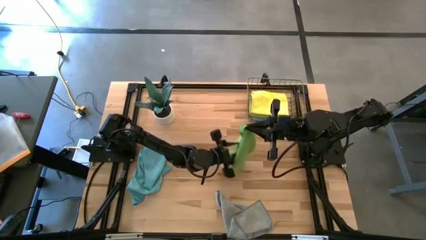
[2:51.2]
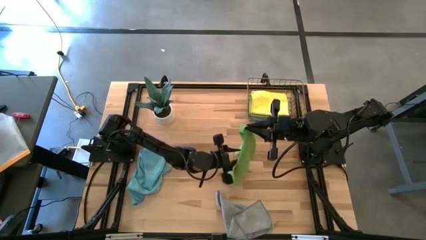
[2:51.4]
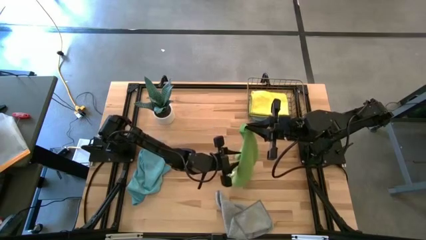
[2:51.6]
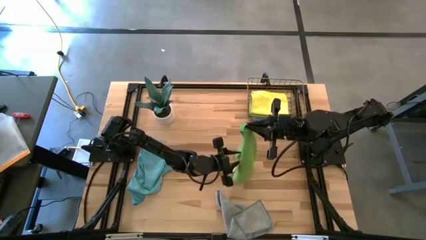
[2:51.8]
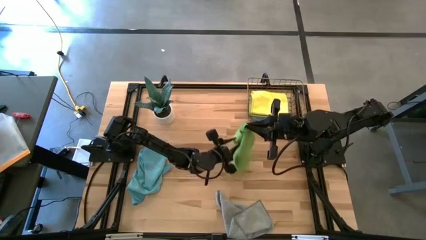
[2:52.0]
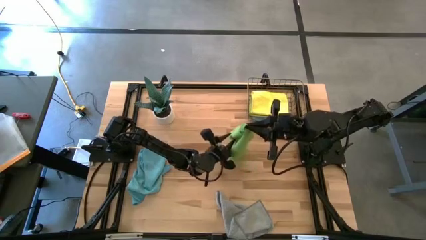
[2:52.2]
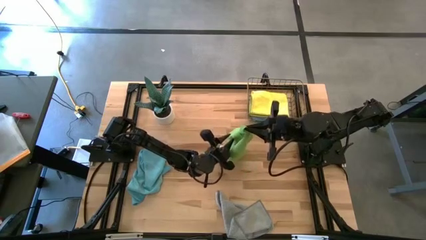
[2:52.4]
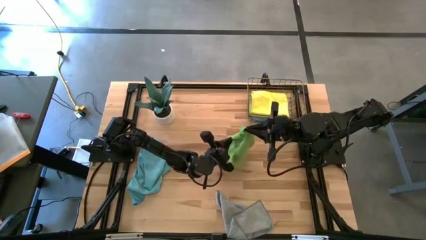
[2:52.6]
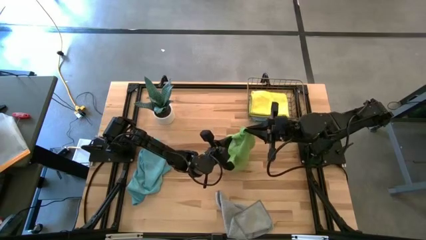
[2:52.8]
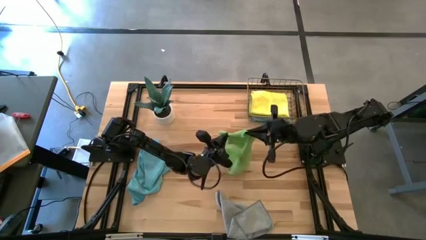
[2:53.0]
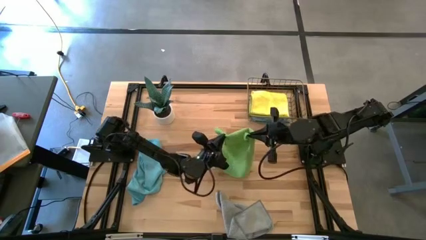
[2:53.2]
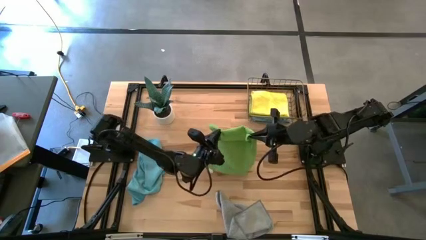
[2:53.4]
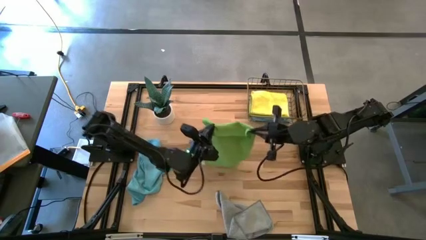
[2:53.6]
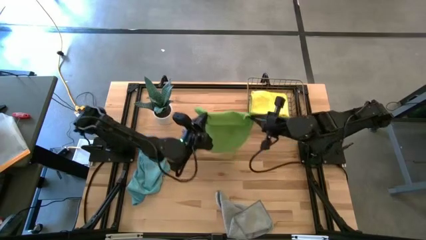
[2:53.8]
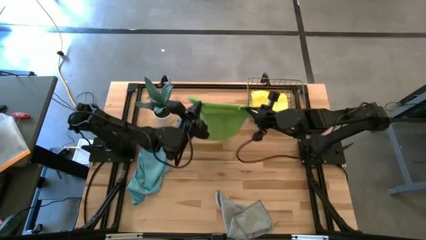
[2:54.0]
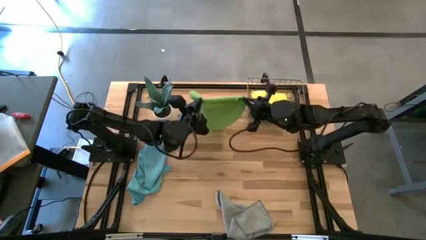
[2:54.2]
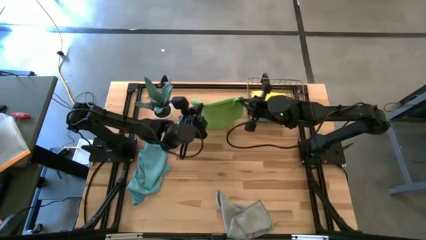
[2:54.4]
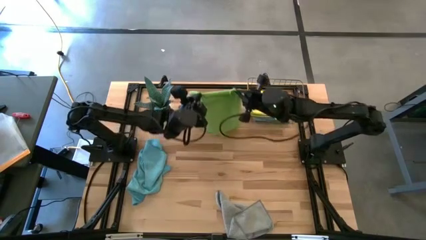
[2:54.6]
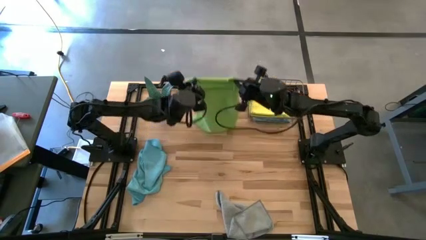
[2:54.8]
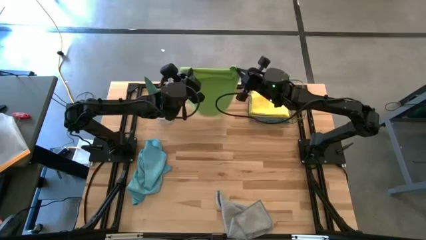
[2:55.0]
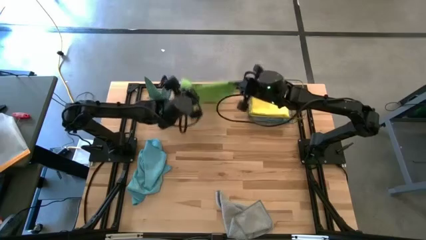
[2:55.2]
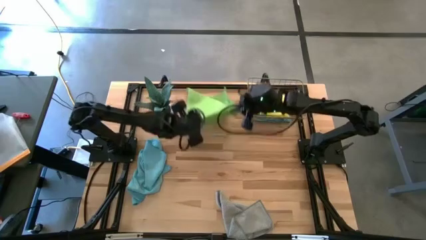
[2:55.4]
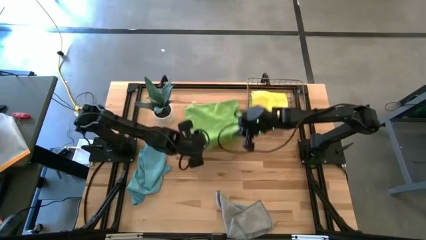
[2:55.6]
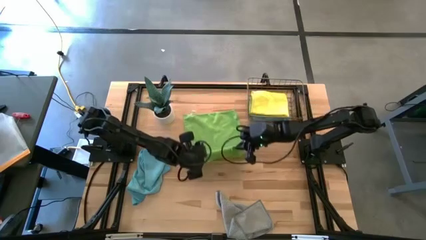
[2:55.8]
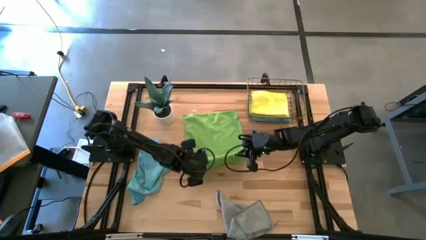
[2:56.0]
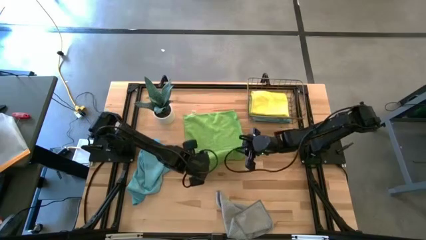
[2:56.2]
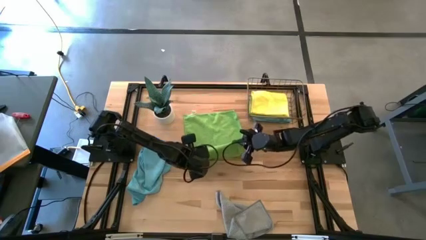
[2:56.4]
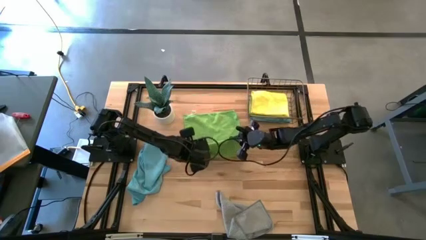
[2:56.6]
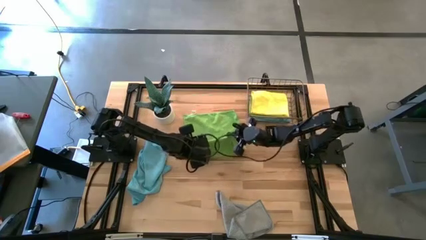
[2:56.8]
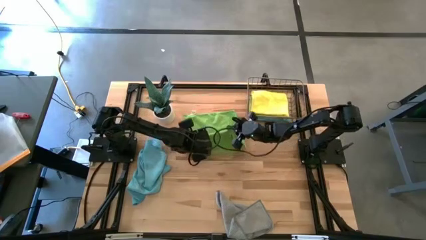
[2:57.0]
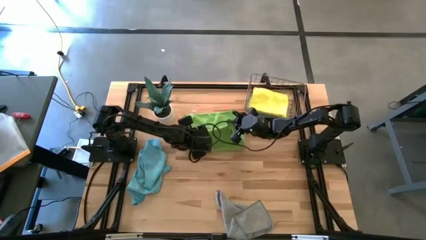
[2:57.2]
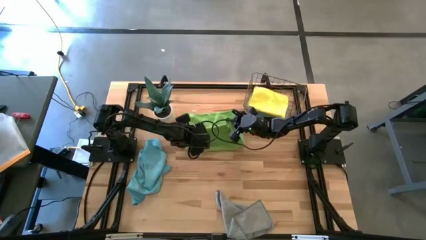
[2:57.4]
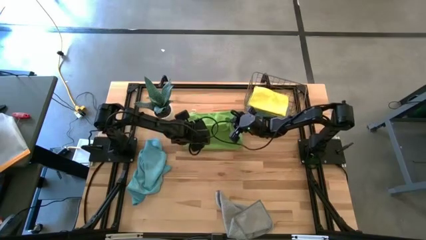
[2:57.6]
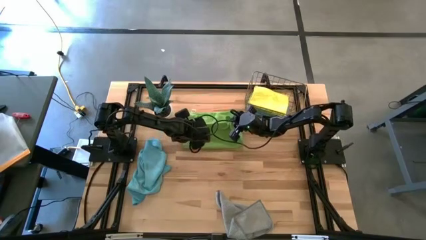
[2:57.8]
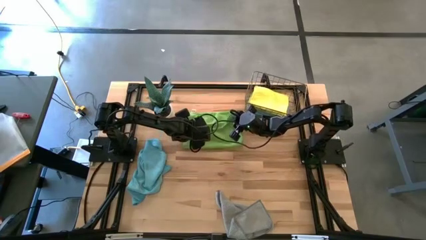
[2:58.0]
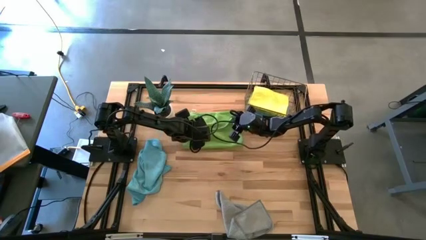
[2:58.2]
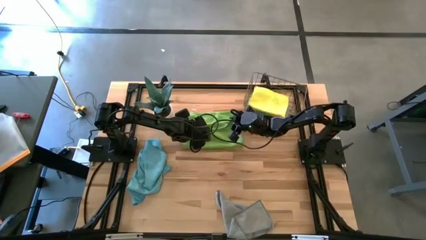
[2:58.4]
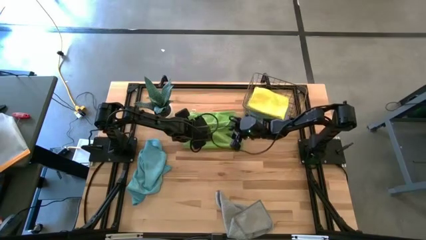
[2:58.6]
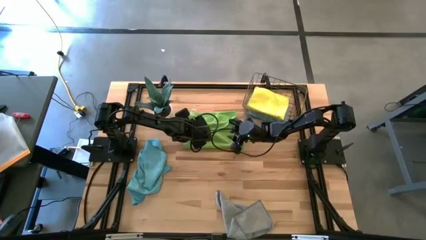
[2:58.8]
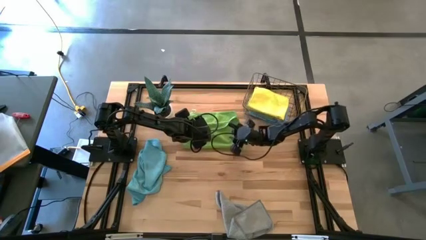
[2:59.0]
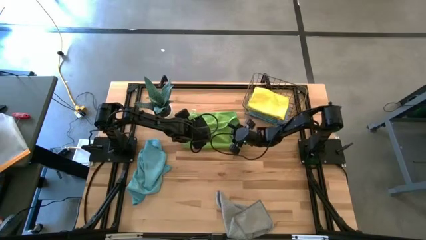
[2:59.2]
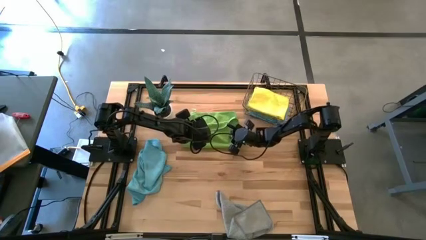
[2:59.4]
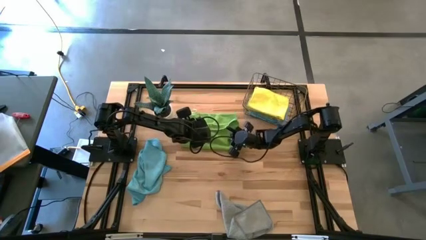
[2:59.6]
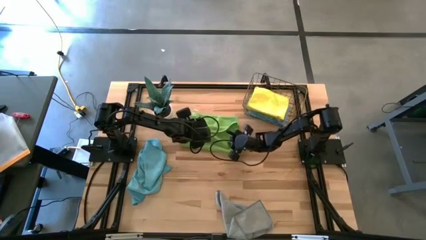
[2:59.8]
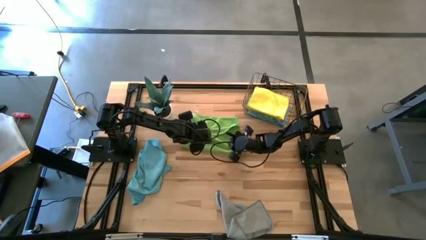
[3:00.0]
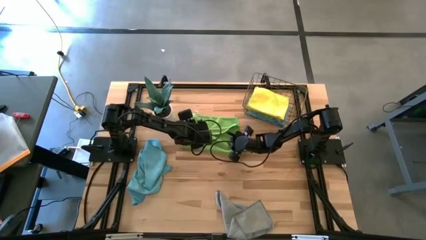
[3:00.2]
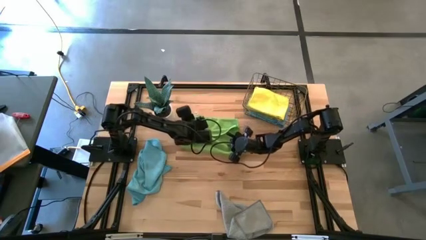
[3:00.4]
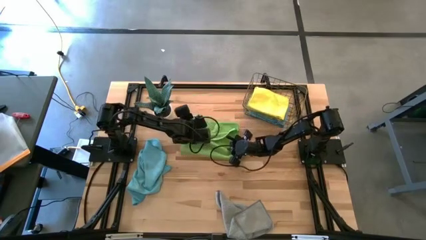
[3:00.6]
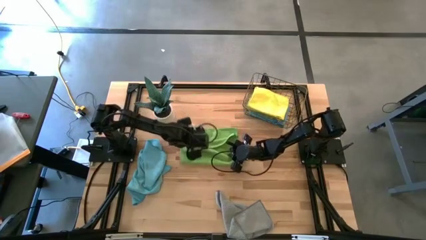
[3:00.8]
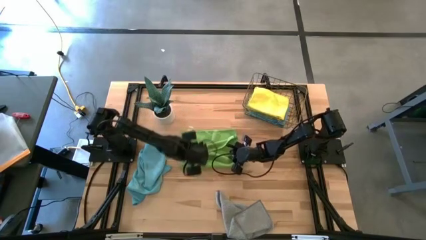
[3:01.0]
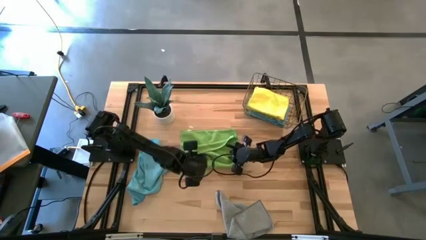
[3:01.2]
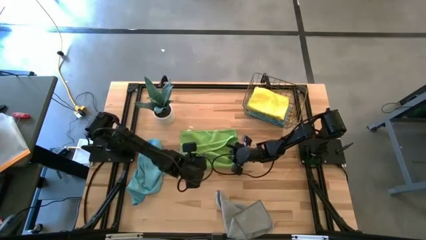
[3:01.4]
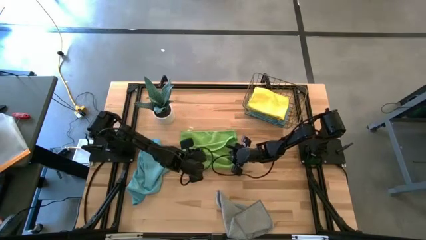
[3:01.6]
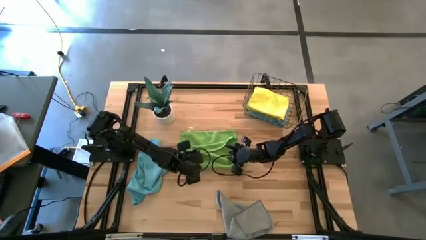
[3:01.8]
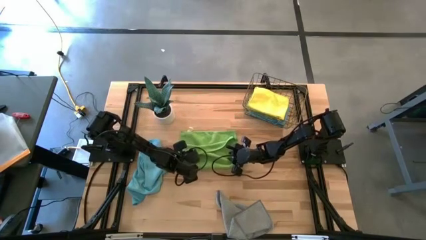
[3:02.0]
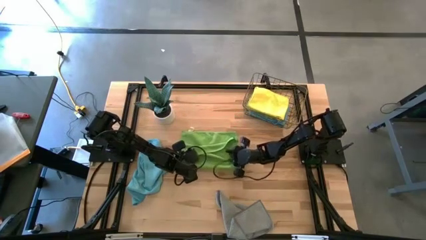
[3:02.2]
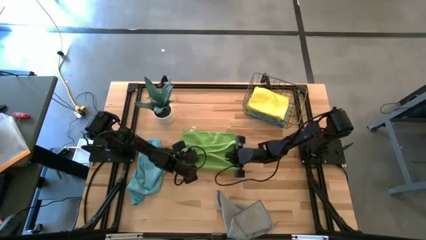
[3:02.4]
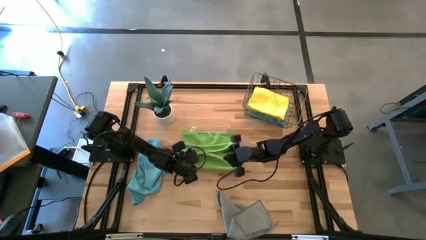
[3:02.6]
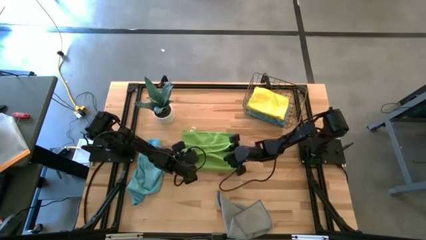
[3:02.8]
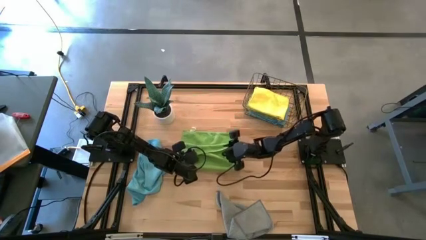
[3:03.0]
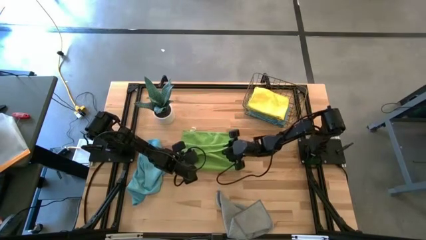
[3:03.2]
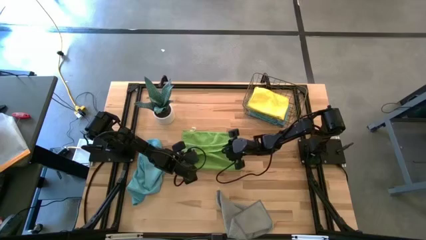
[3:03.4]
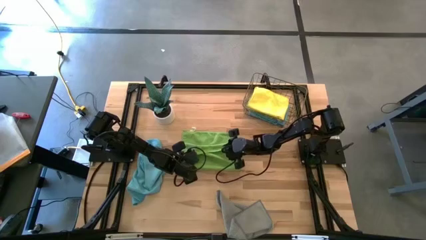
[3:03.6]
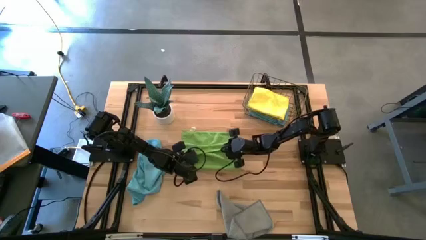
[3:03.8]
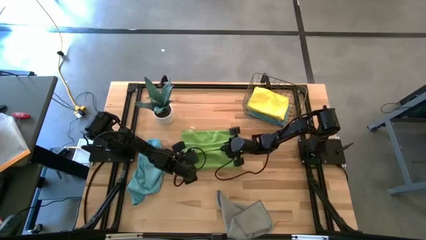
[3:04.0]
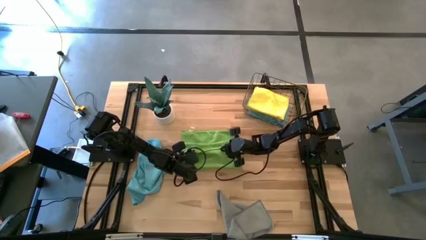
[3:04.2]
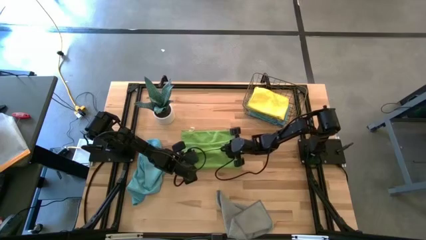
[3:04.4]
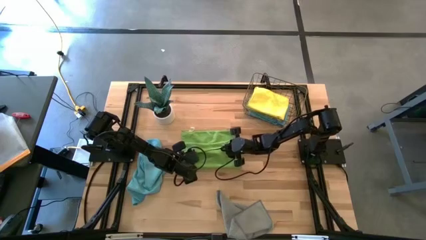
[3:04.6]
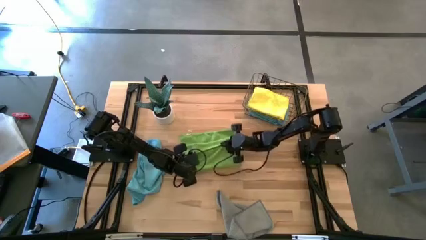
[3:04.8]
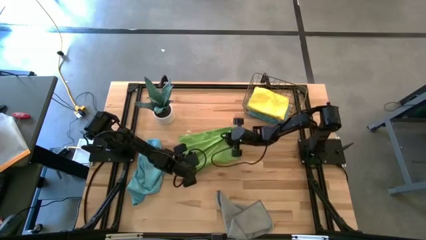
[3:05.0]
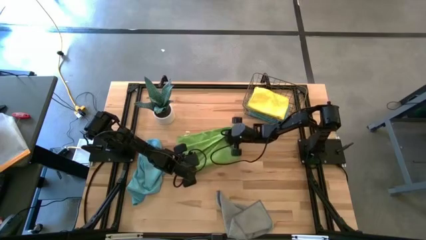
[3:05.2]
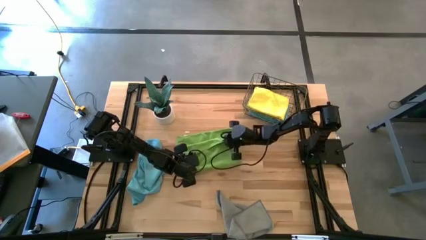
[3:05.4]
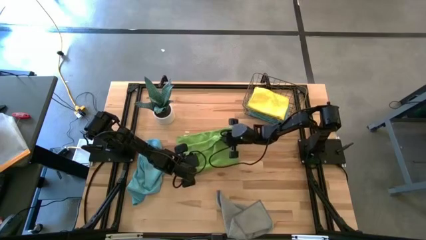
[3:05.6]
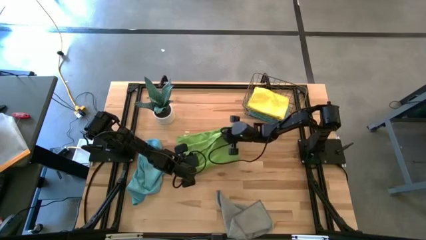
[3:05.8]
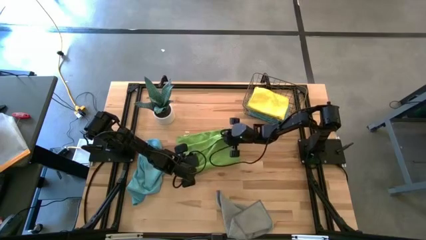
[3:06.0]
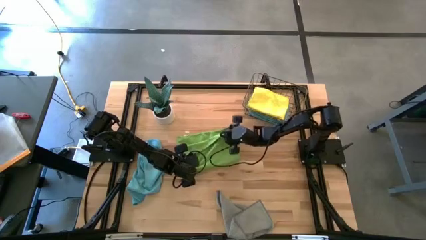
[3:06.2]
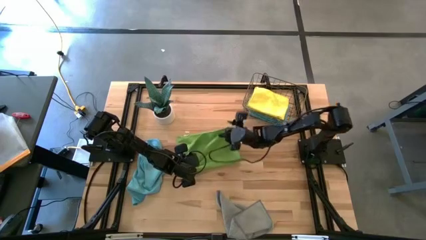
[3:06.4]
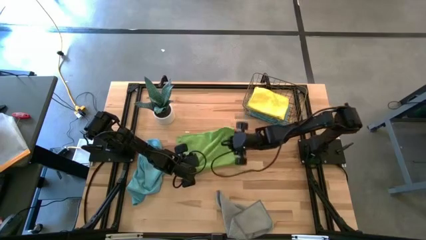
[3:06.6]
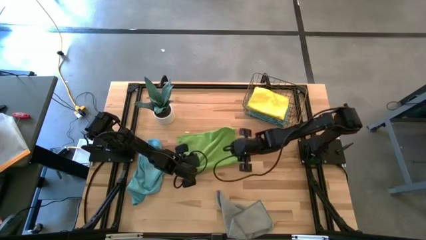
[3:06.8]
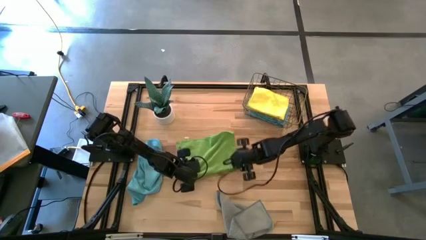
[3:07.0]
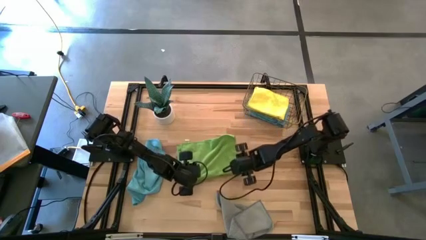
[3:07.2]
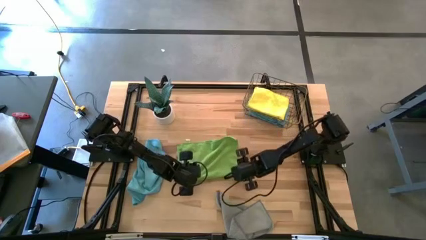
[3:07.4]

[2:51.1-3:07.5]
Task: Fold microfiber towels
Fold the green towel
